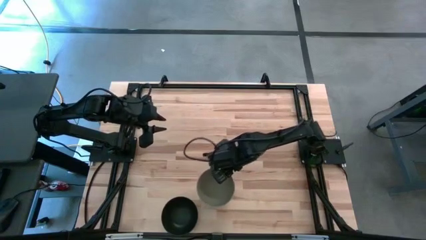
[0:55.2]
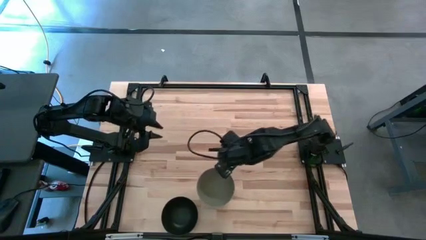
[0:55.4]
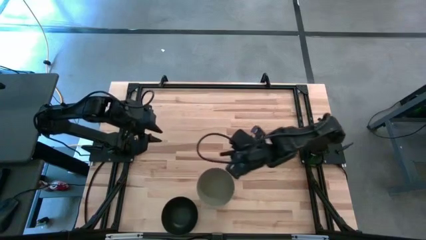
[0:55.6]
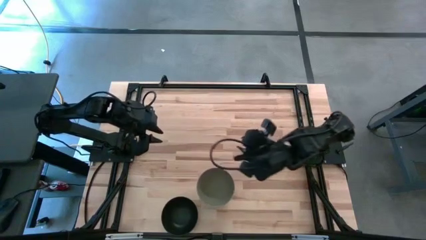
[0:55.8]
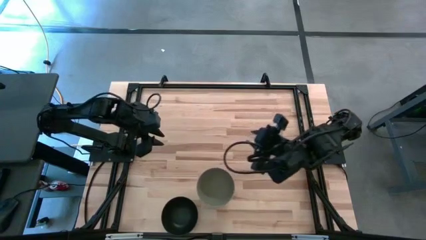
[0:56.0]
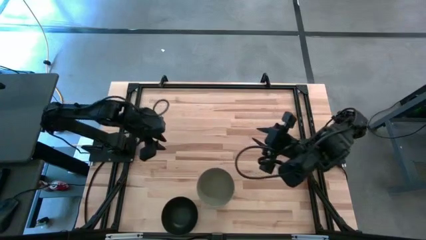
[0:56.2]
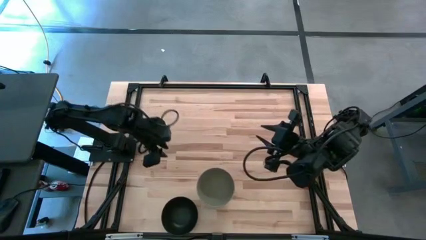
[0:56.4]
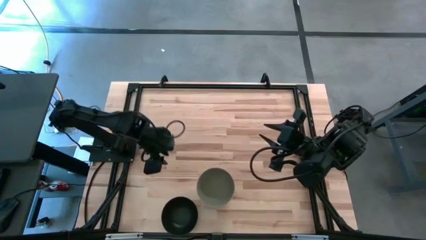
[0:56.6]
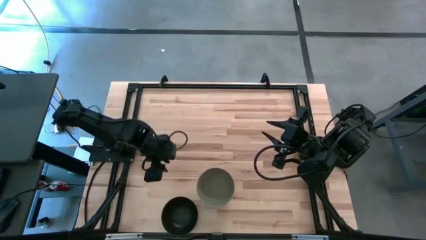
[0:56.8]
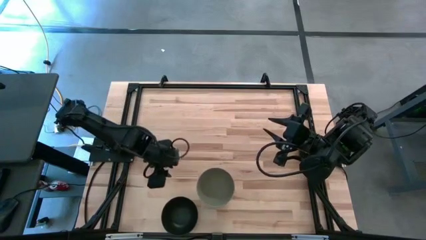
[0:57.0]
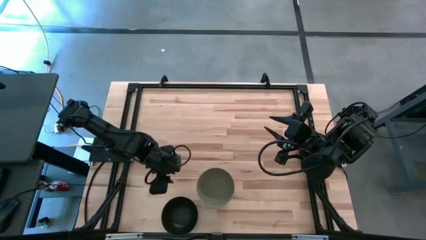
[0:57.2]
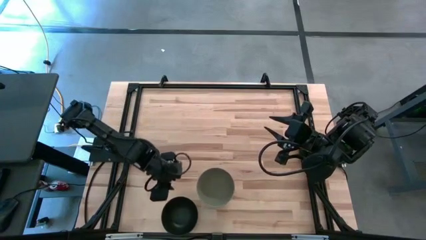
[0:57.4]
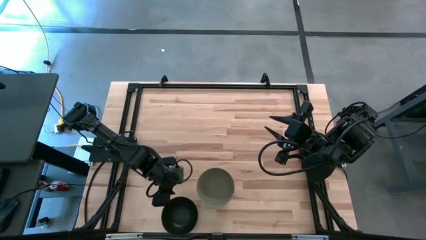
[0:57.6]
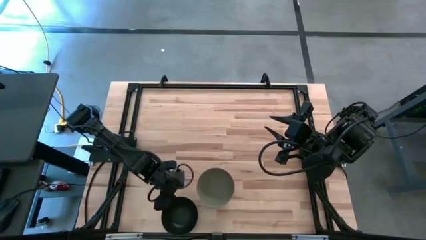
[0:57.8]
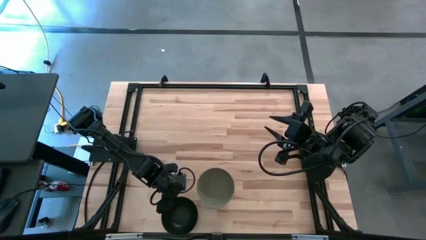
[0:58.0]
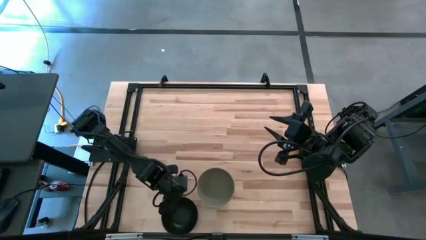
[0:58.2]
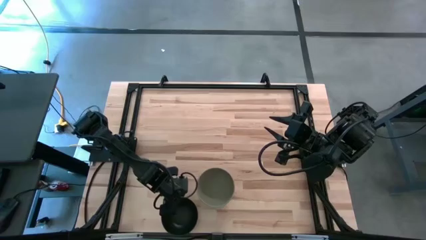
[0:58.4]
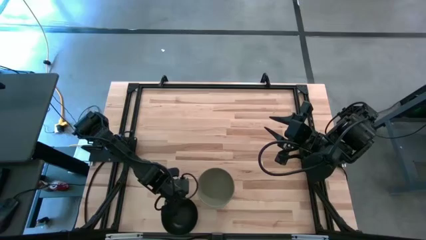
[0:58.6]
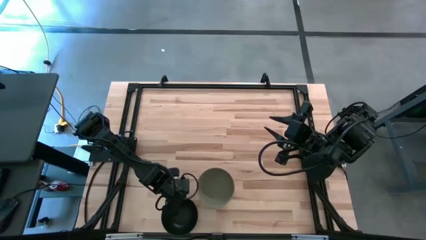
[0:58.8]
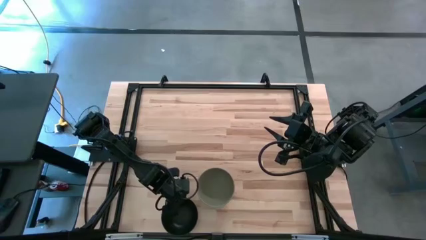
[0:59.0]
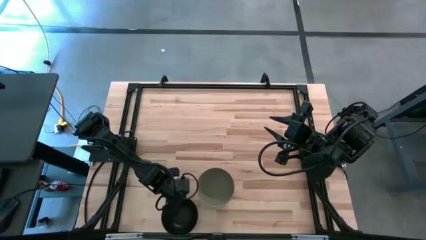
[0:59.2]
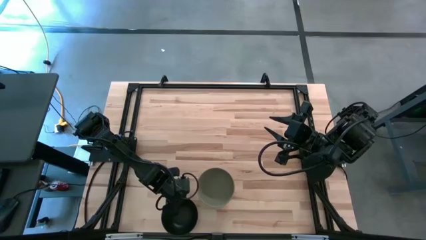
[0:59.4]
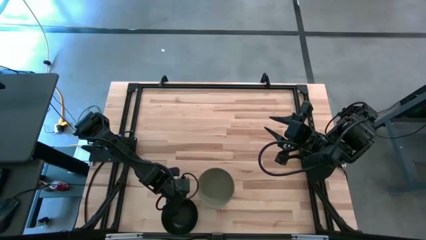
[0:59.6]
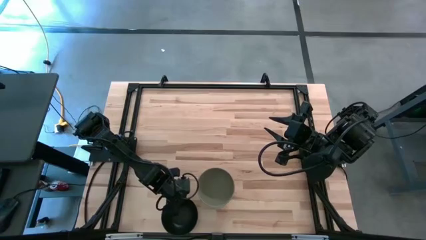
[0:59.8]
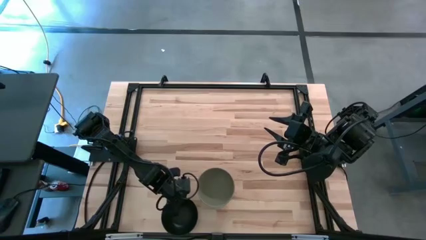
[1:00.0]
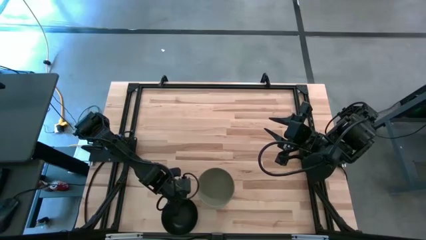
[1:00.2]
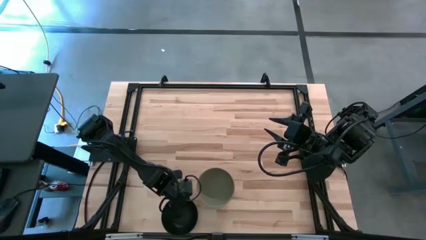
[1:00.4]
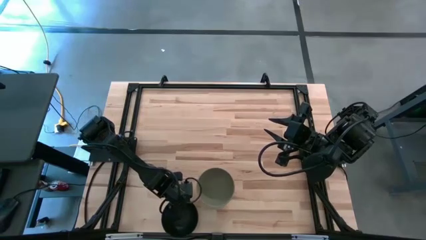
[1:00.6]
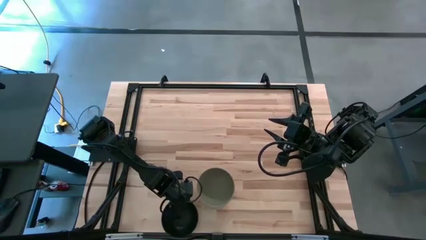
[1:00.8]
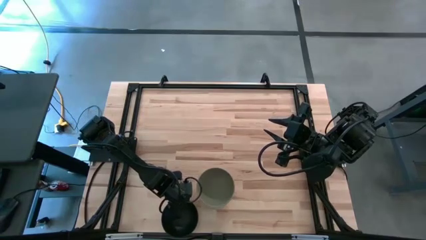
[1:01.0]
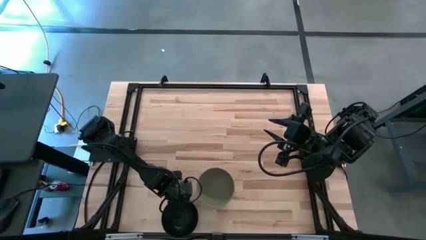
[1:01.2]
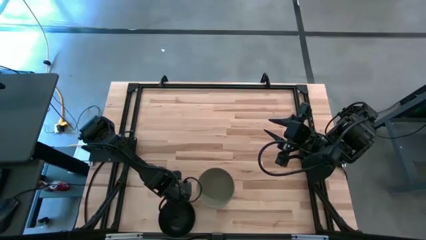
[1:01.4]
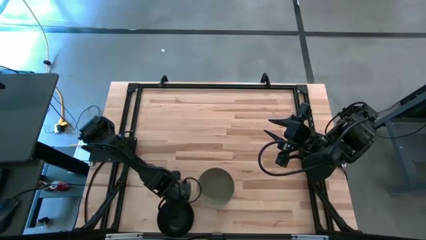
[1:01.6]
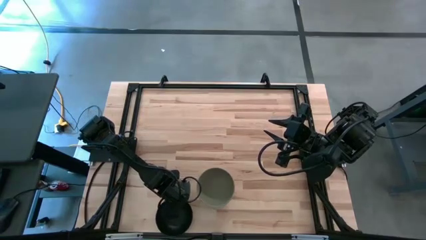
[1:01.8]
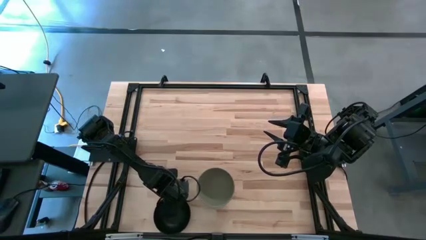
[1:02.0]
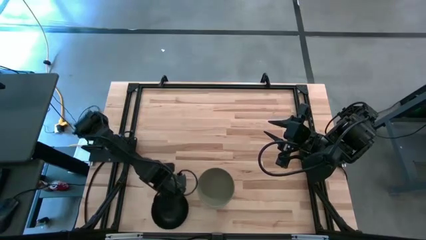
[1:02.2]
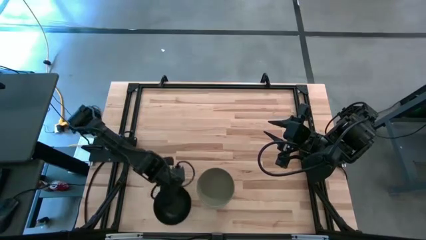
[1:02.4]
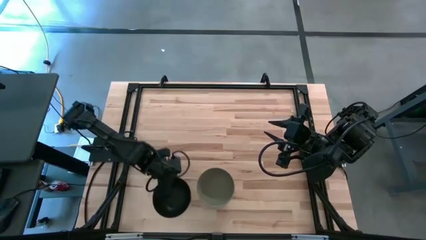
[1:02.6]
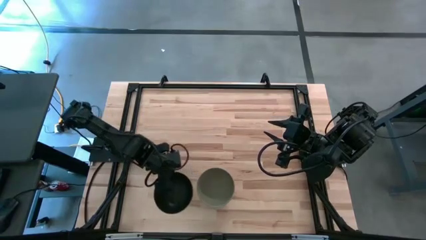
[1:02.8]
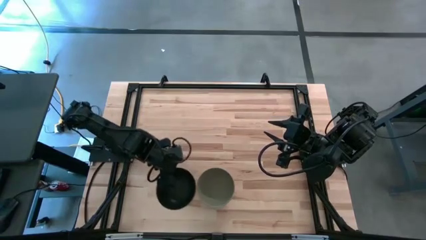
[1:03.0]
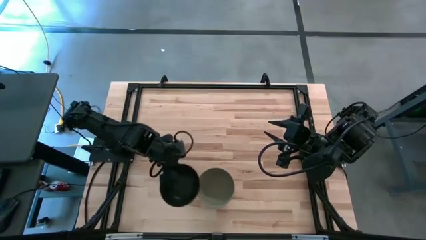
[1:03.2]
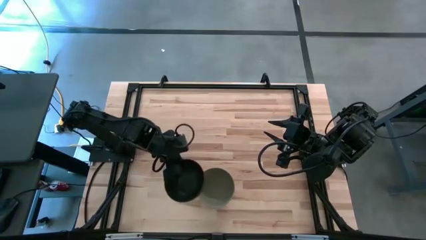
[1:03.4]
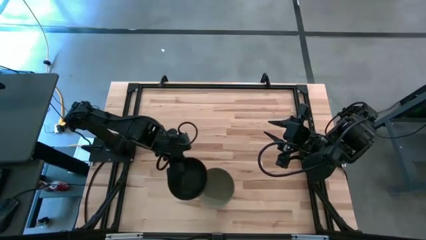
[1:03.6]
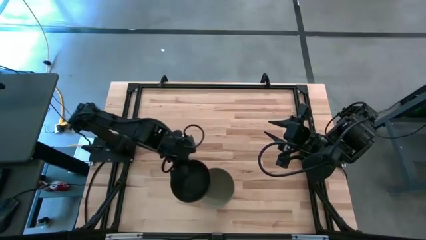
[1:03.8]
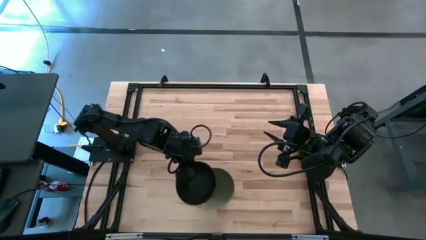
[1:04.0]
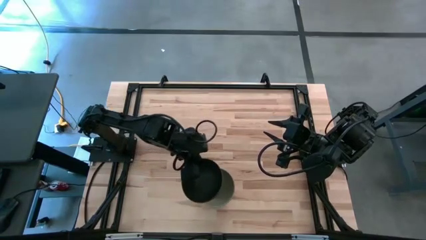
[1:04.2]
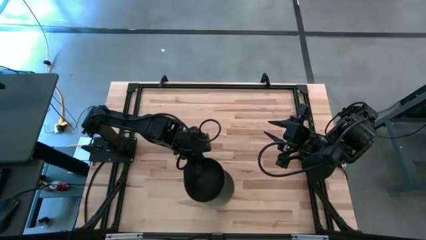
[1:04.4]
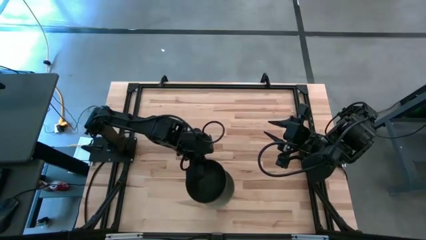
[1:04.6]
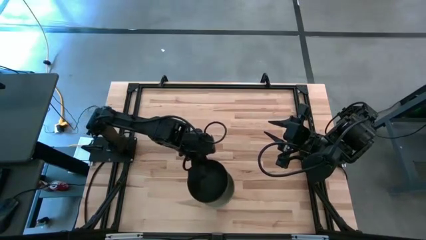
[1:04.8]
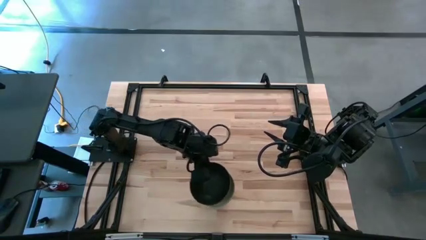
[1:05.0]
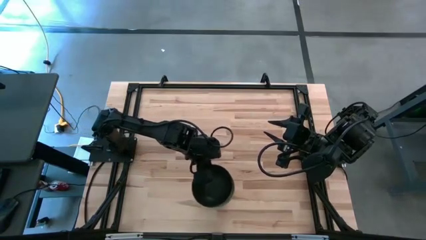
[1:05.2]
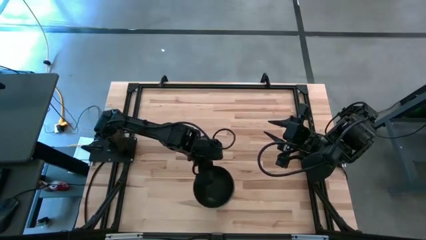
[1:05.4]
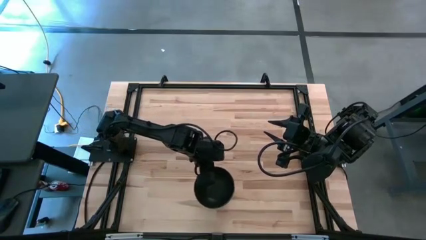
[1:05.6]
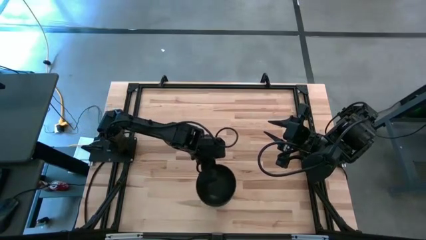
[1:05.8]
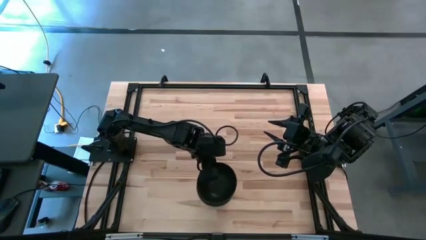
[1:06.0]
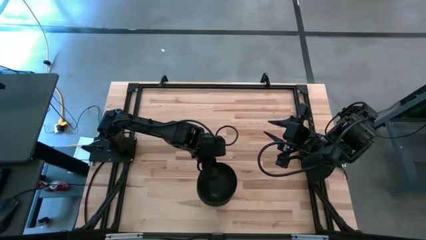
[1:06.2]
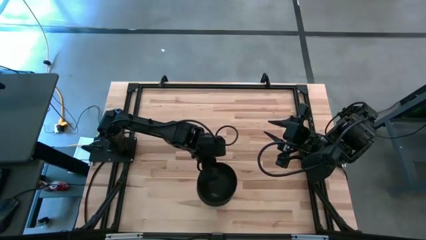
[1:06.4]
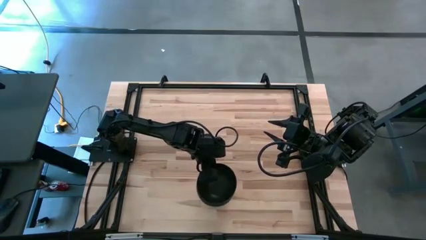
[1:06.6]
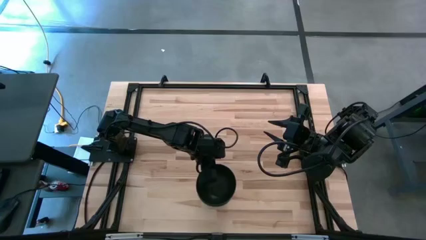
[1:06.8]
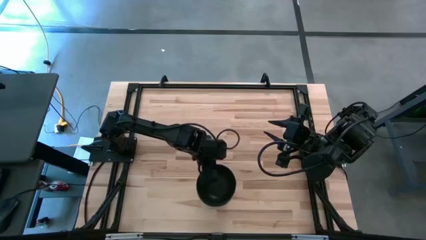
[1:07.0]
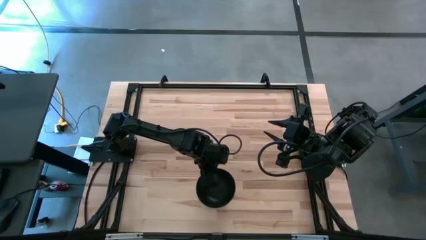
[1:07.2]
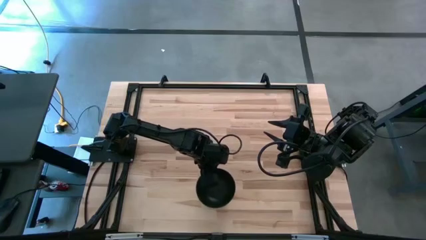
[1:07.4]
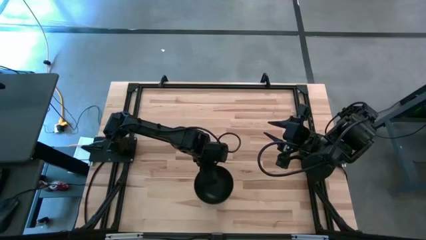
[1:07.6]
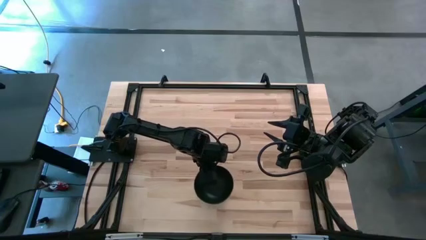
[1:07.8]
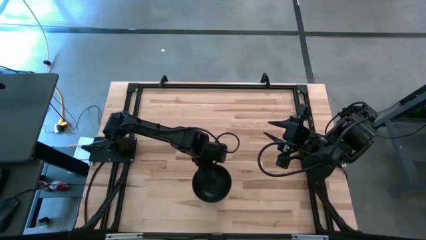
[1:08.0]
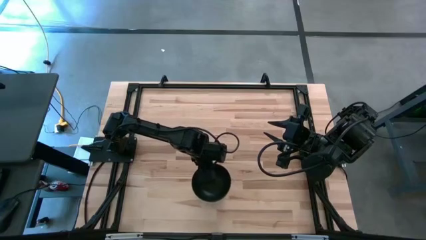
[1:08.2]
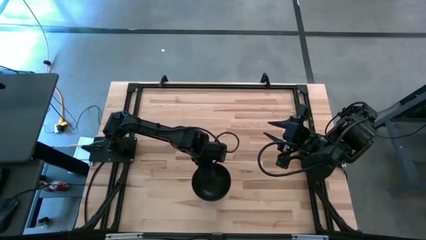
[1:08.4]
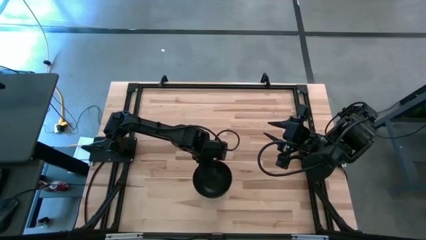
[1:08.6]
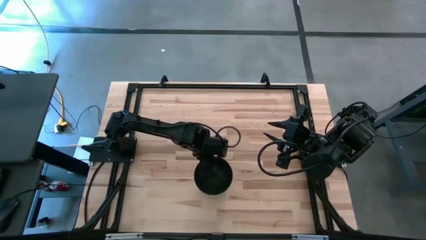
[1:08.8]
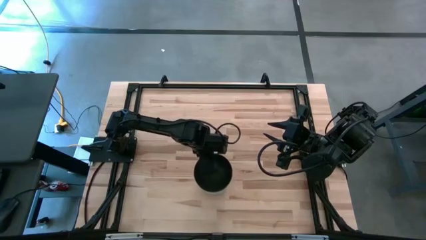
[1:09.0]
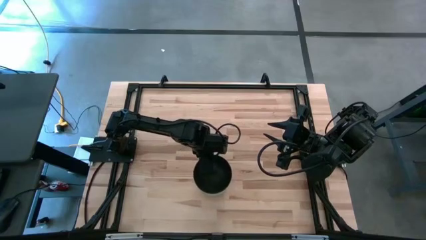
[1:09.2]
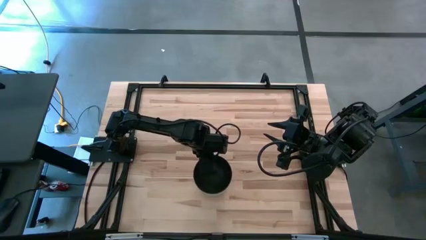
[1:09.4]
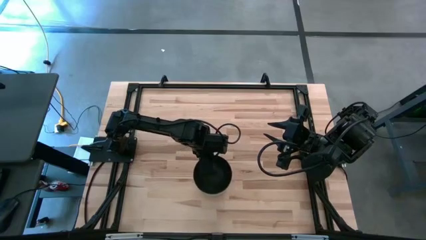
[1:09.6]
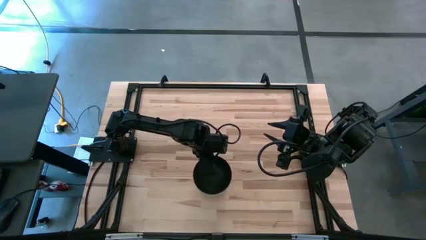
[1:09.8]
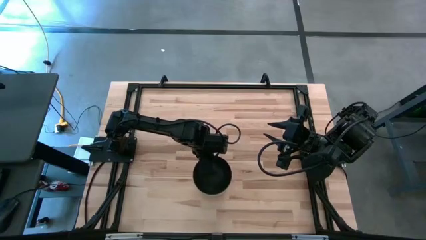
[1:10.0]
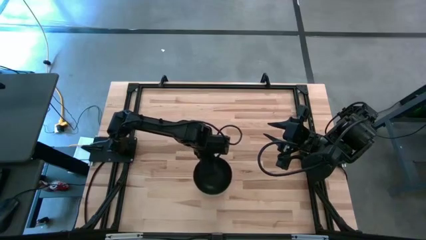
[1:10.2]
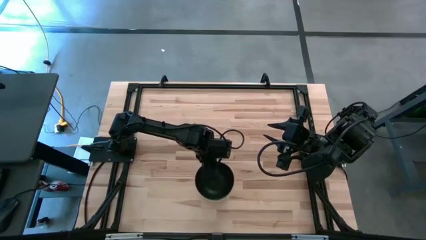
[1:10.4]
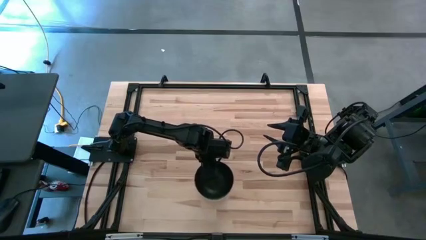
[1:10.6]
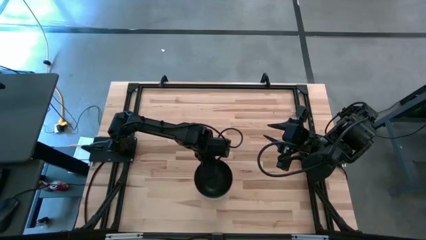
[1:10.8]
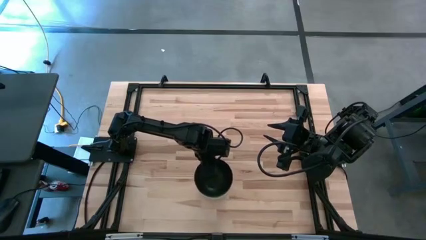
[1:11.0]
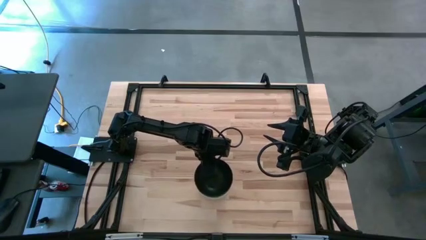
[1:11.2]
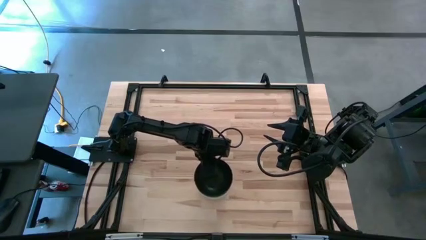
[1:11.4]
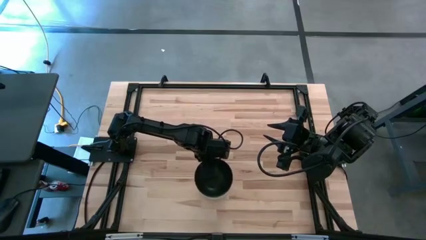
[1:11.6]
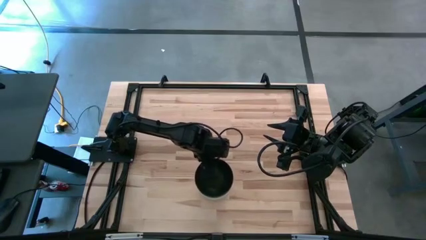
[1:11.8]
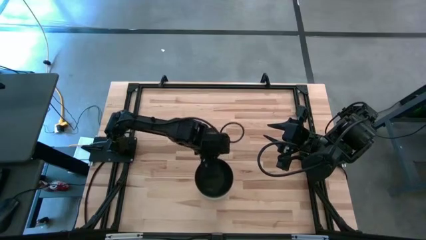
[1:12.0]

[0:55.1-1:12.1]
Task: Nest bowls inside each other
Stack the black bowl on top of the gray bowl
